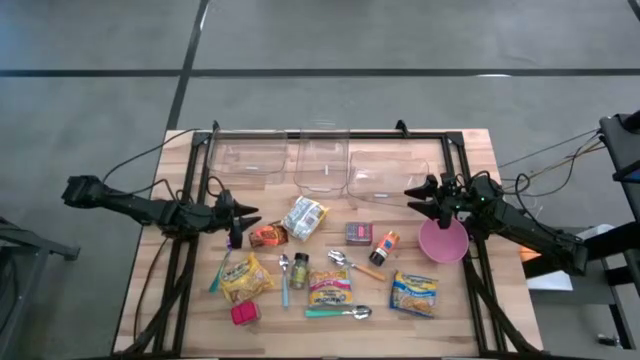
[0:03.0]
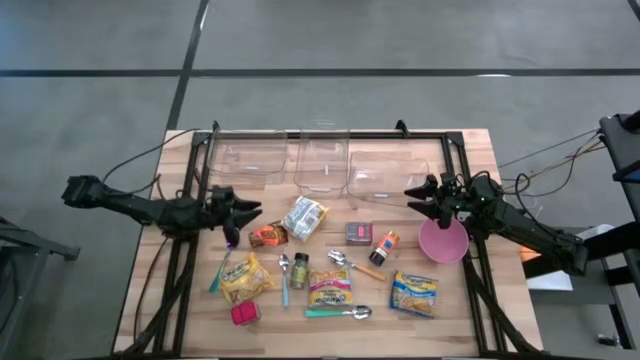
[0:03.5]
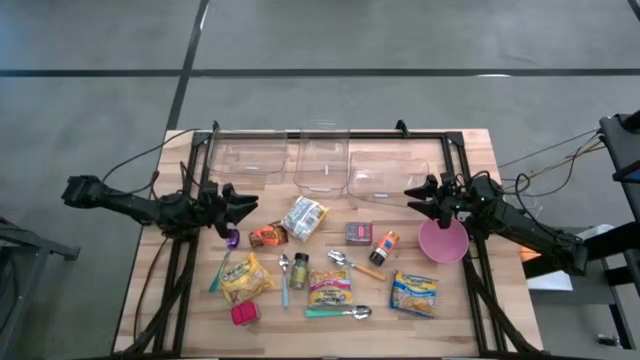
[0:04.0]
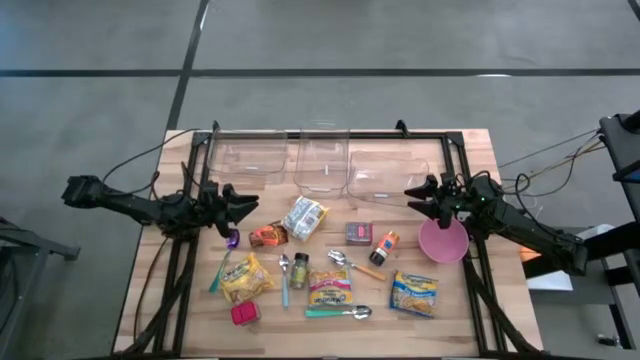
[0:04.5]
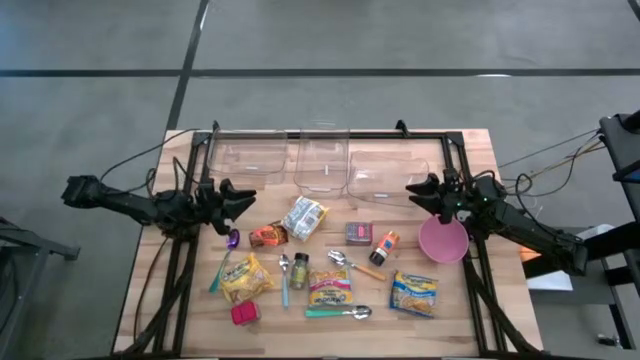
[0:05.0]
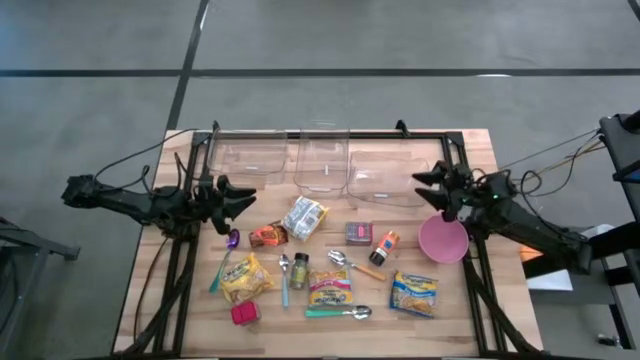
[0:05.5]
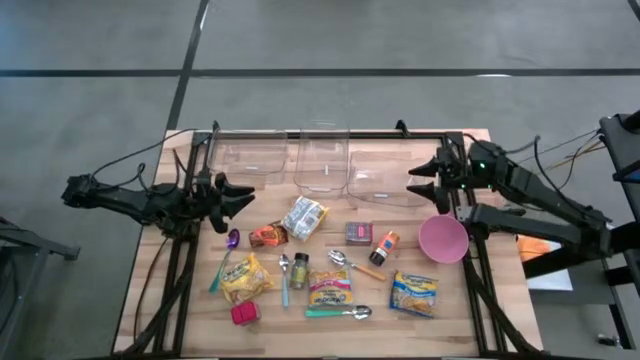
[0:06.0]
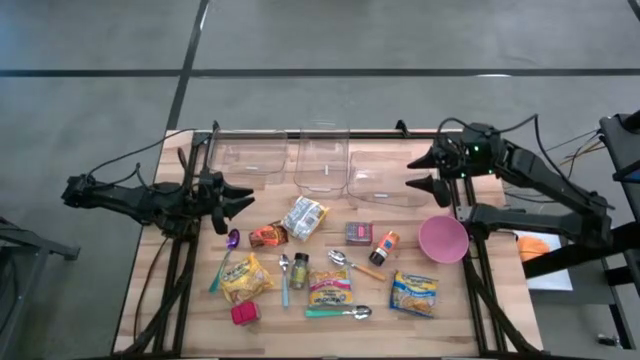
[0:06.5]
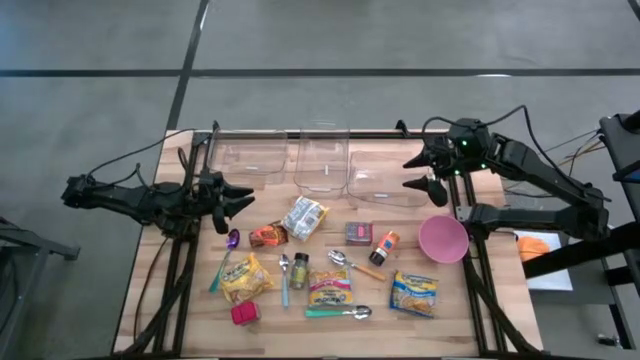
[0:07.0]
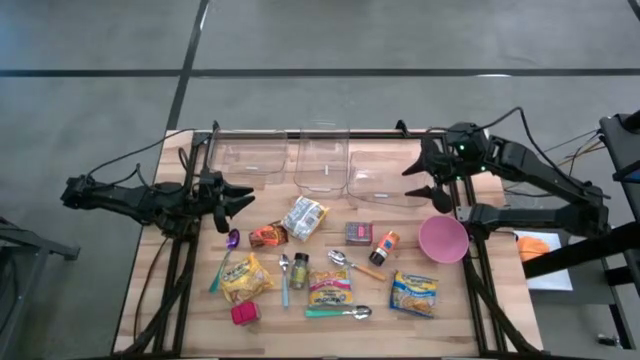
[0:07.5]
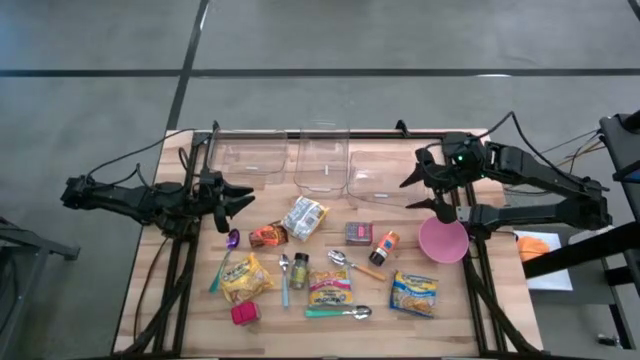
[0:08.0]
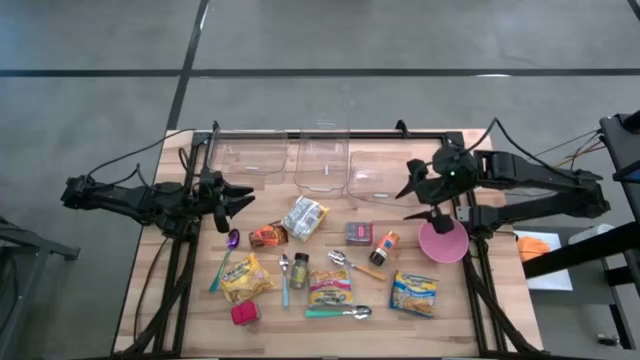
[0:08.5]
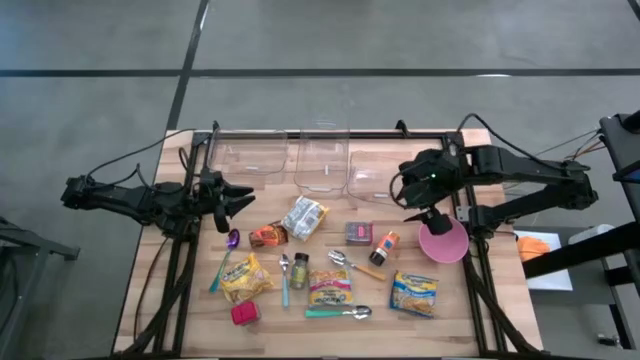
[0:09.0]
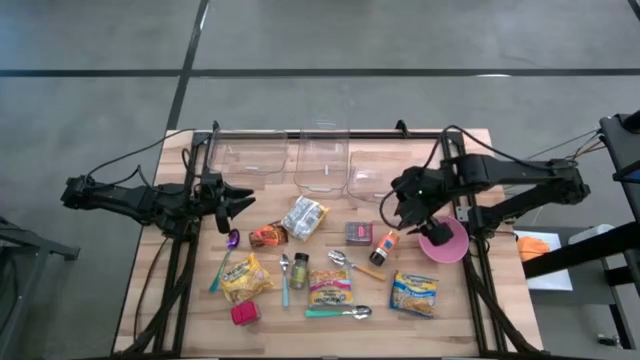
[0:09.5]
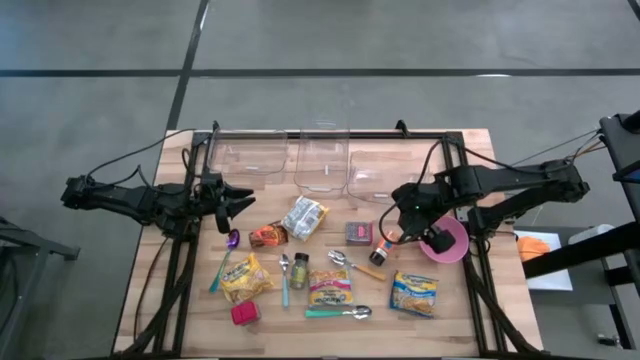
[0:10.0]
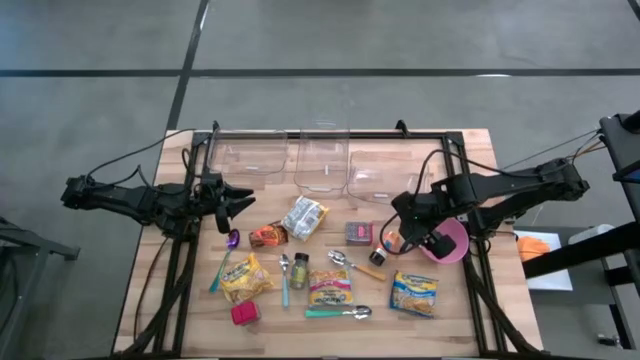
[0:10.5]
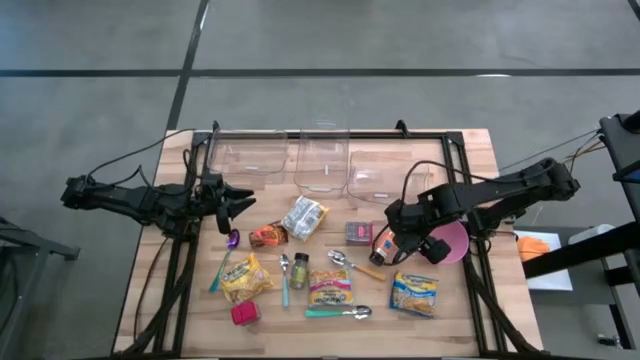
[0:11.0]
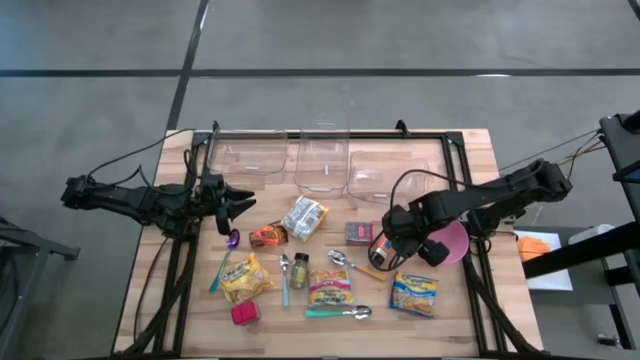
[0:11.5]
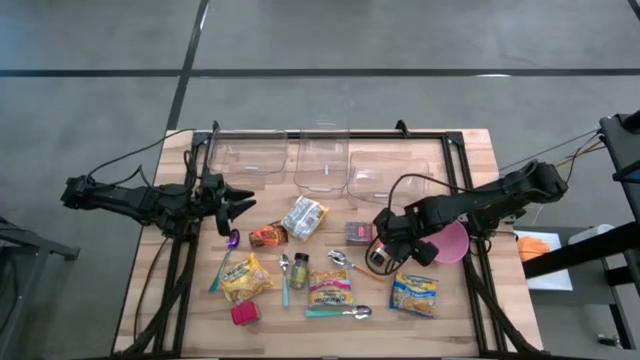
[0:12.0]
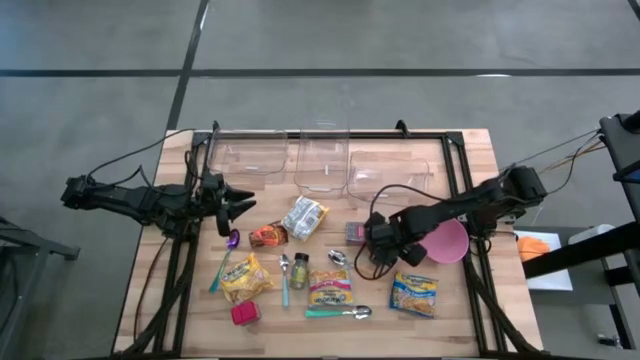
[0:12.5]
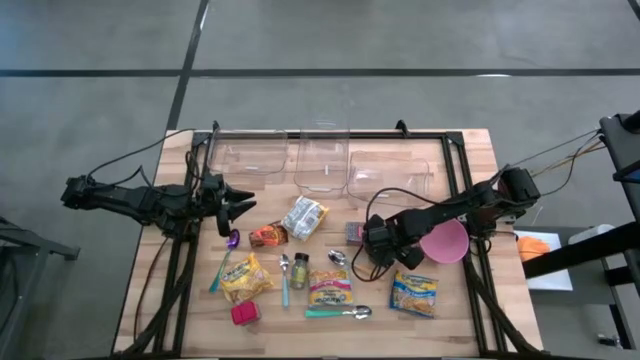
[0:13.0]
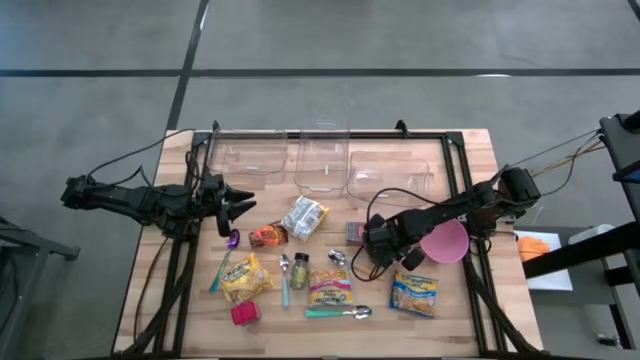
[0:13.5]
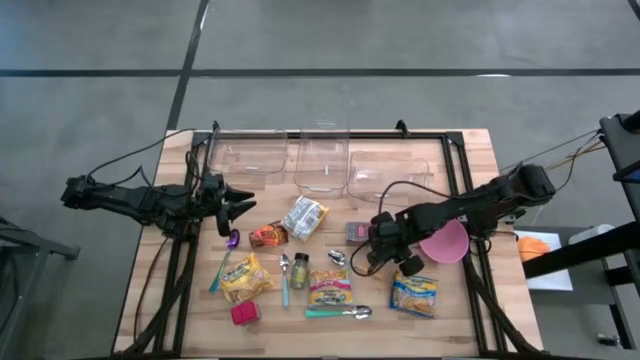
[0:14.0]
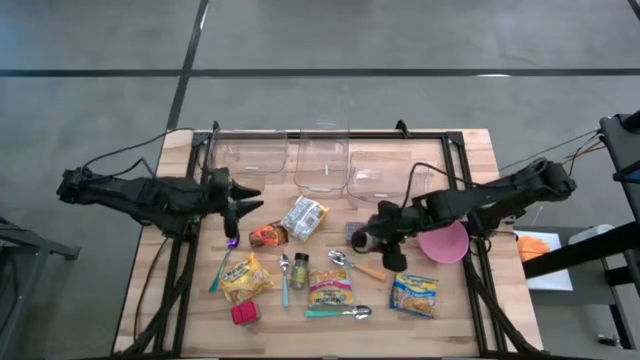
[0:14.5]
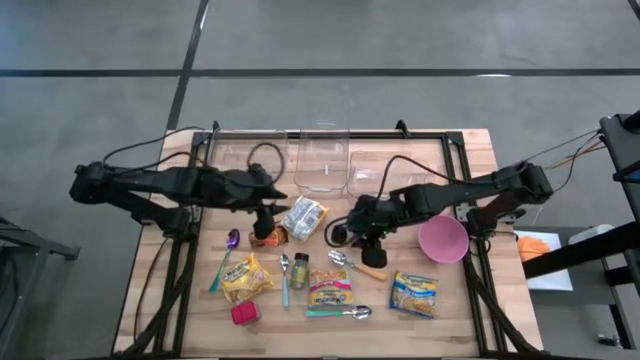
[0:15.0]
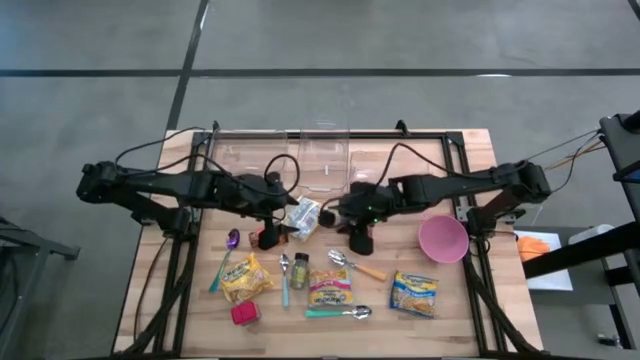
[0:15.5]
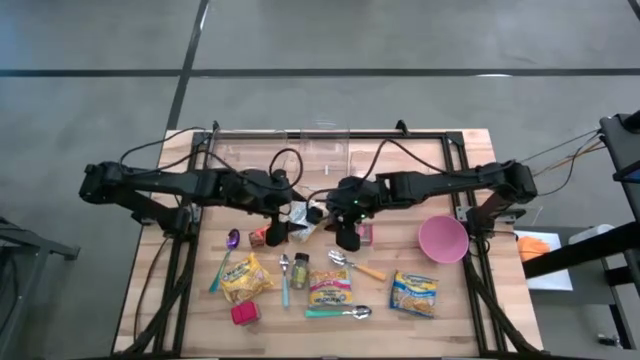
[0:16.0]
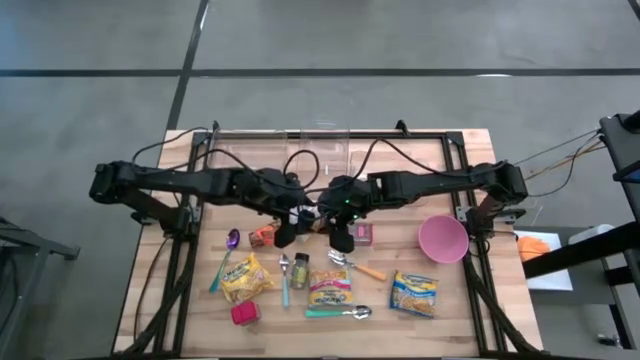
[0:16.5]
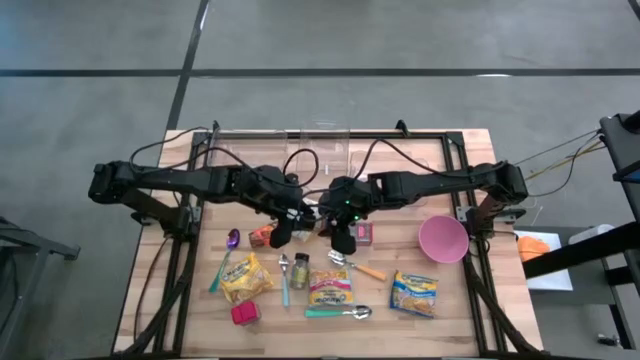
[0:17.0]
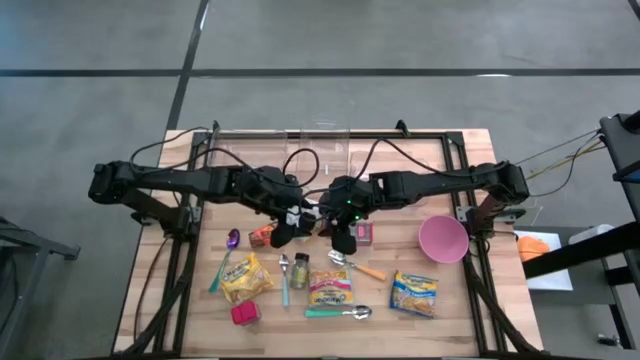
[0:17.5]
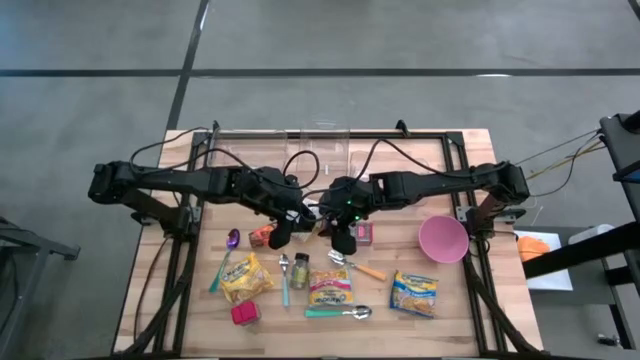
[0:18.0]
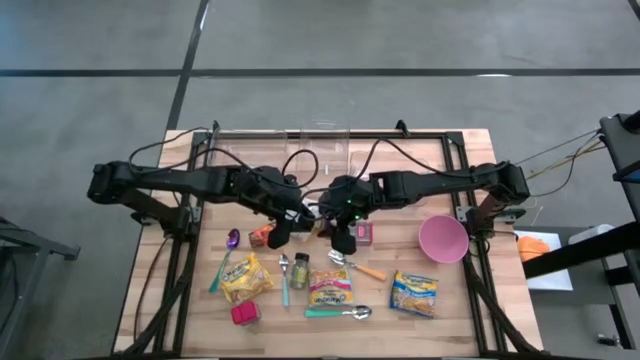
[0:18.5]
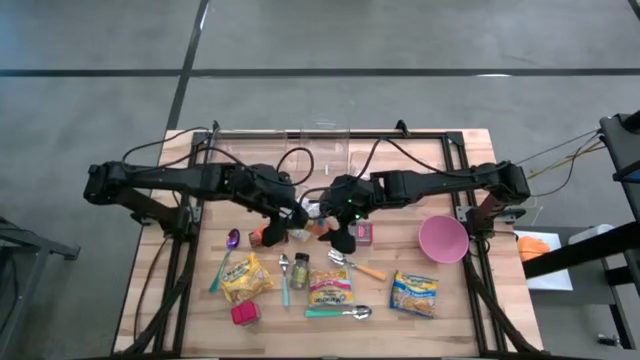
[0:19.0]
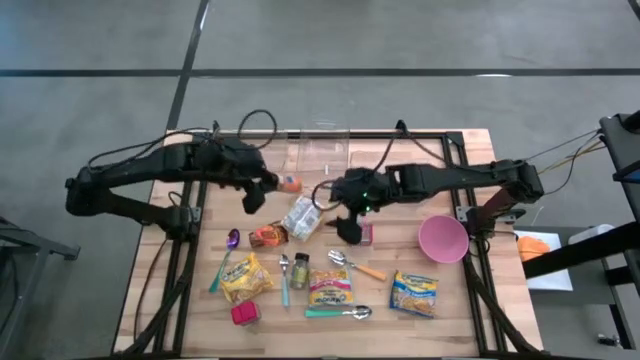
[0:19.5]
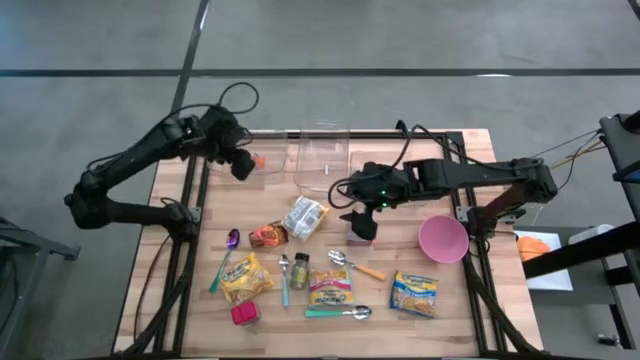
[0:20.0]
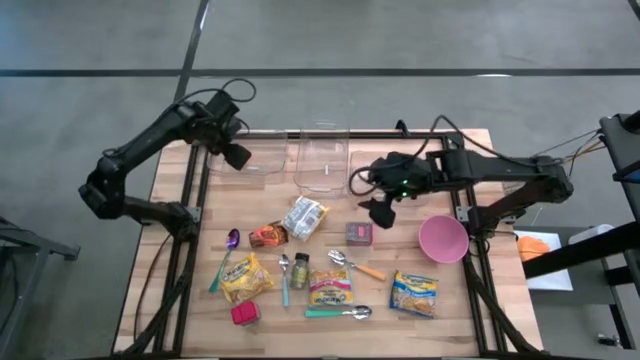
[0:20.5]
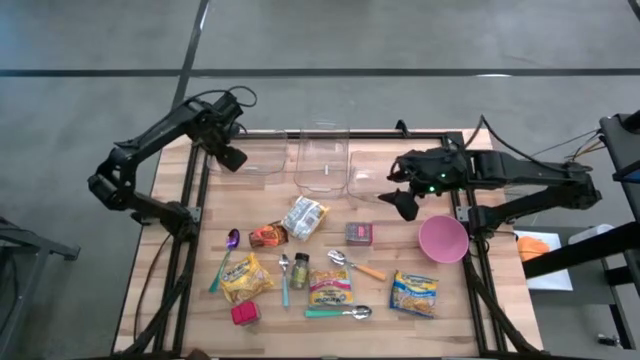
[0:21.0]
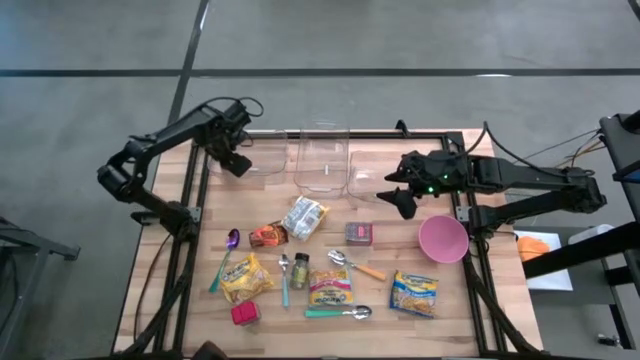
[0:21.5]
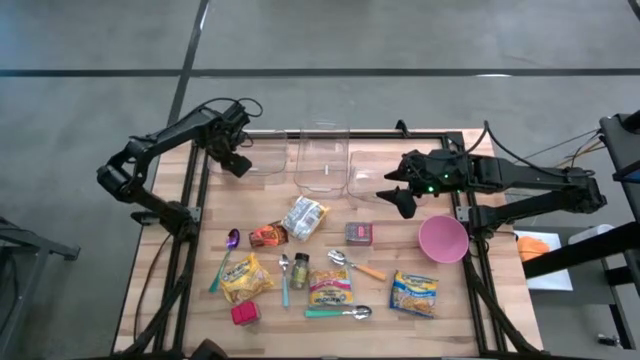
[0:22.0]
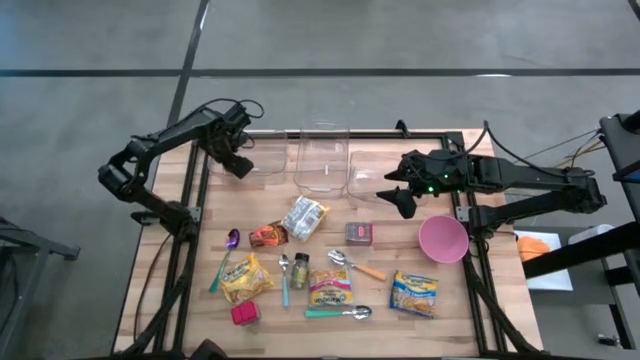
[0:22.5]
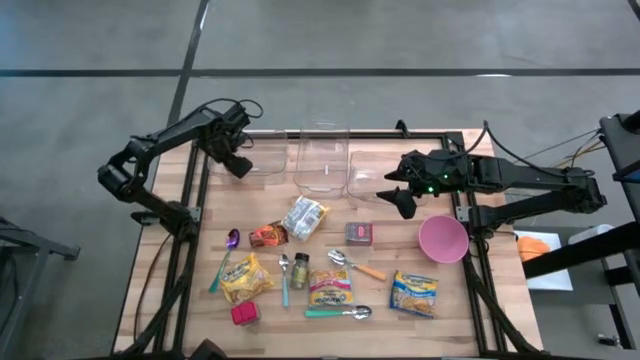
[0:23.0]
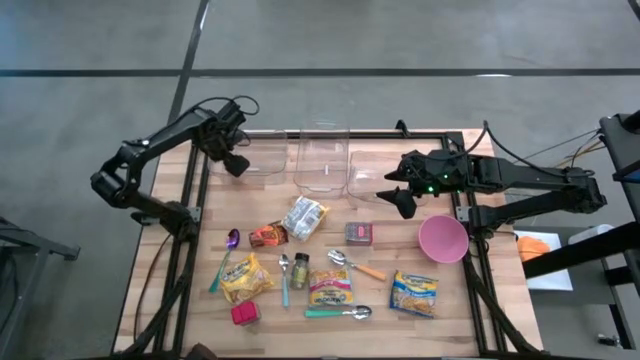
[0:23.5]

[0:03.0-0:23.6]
Put the right black seasoning bottle into the left transparent bin
